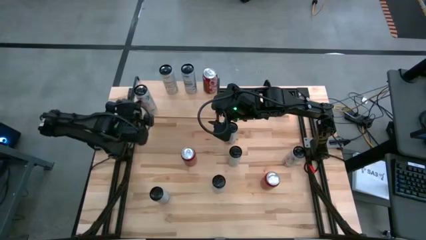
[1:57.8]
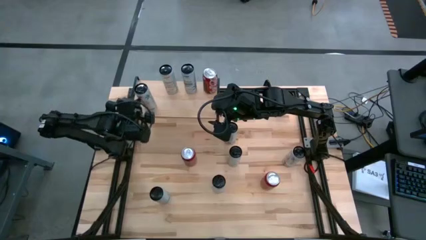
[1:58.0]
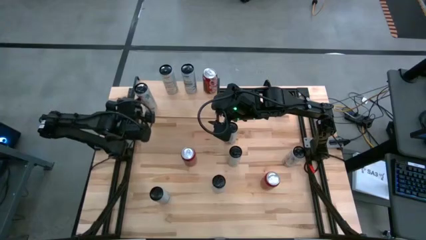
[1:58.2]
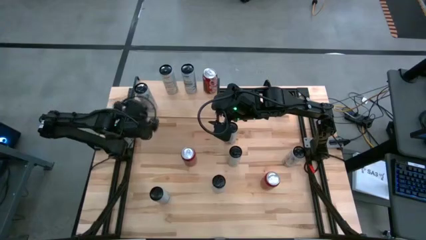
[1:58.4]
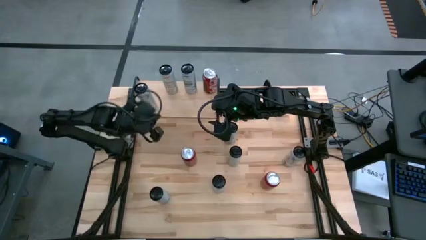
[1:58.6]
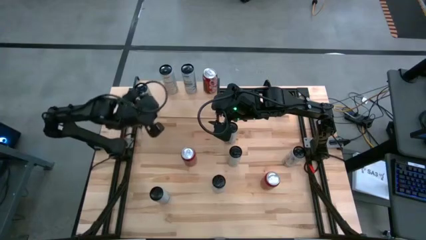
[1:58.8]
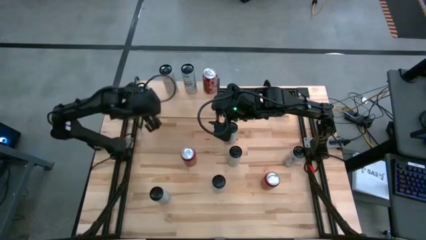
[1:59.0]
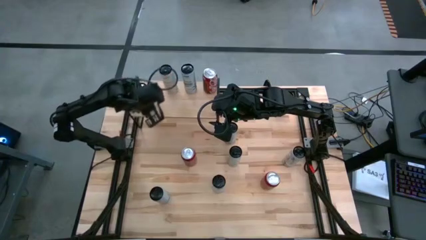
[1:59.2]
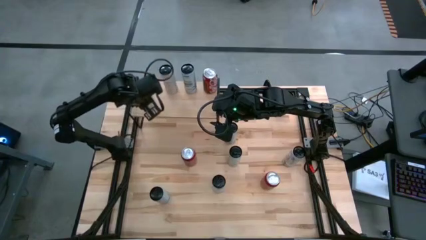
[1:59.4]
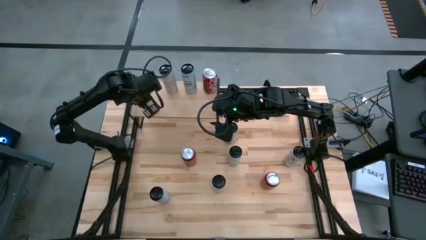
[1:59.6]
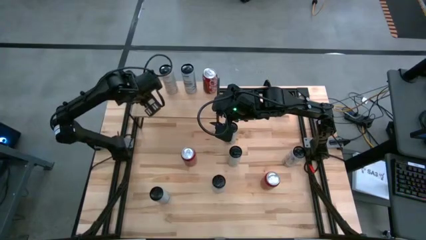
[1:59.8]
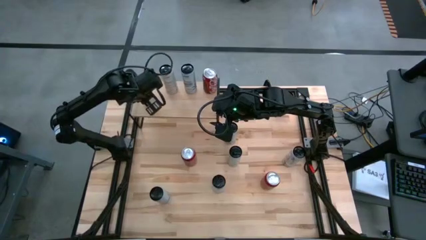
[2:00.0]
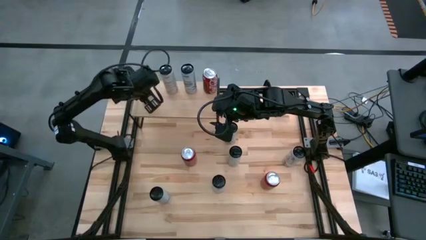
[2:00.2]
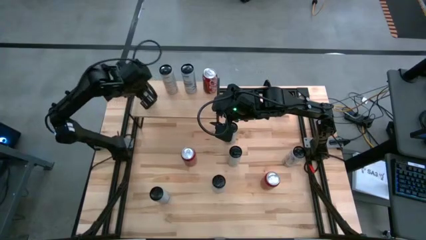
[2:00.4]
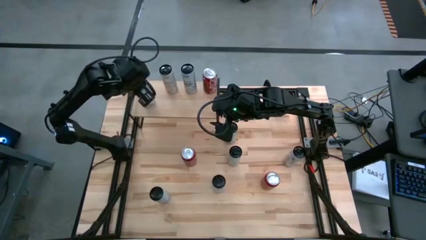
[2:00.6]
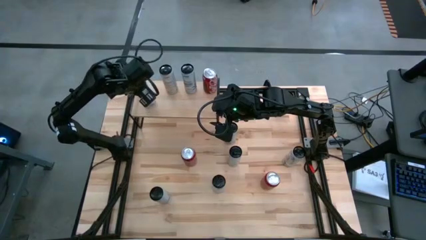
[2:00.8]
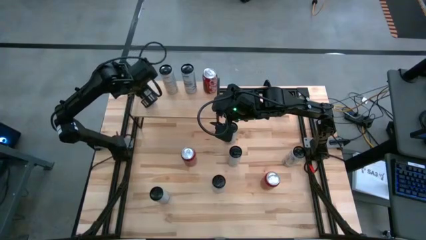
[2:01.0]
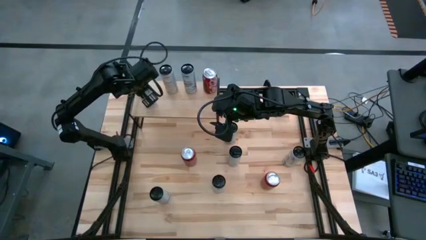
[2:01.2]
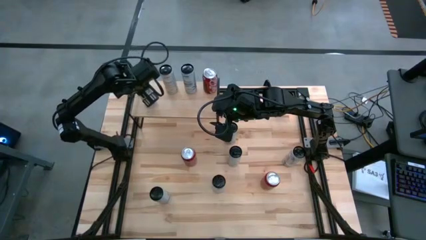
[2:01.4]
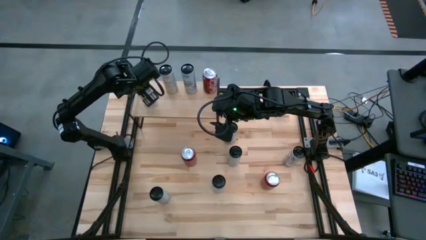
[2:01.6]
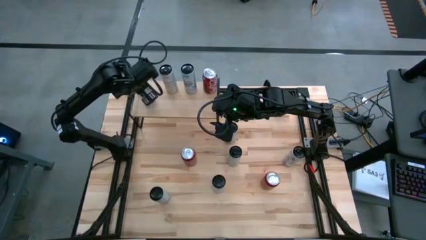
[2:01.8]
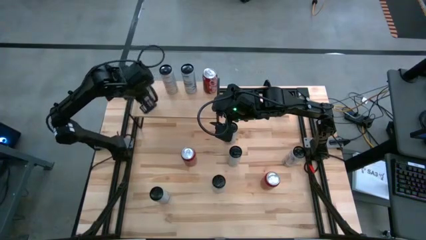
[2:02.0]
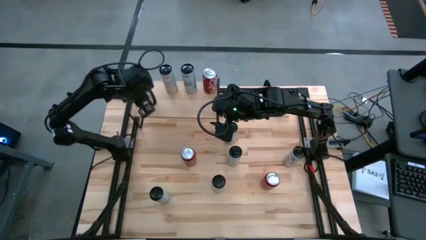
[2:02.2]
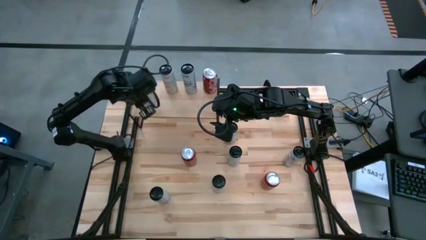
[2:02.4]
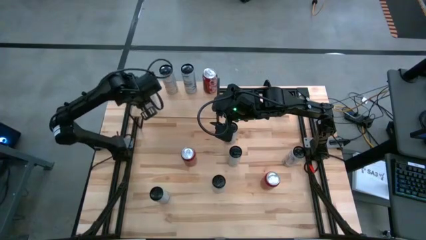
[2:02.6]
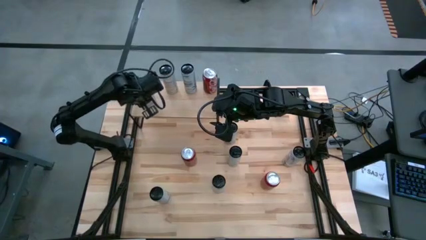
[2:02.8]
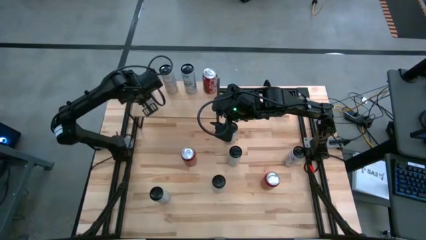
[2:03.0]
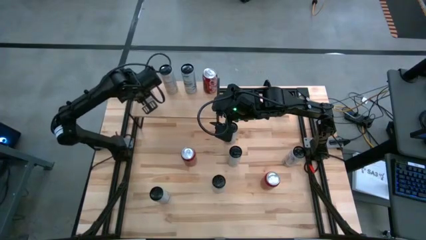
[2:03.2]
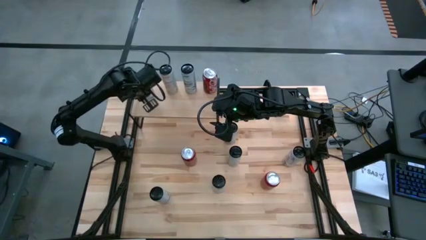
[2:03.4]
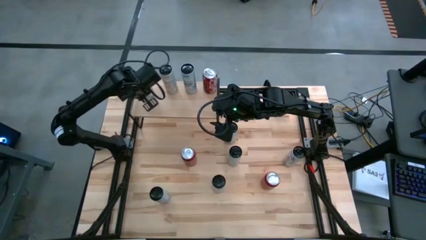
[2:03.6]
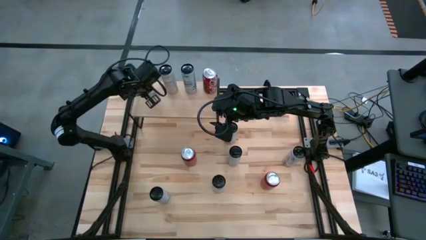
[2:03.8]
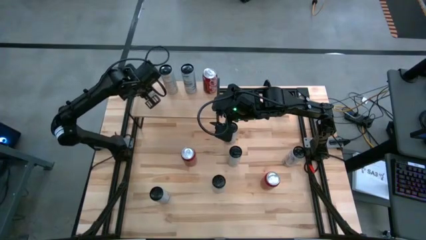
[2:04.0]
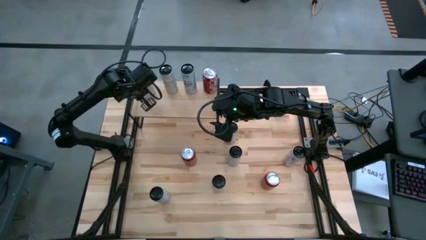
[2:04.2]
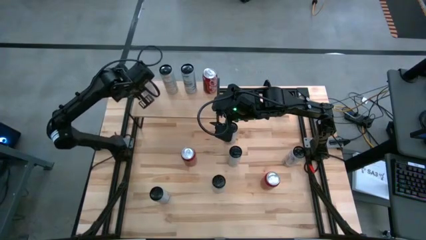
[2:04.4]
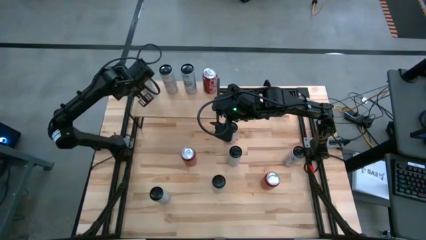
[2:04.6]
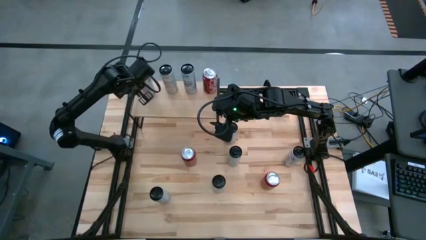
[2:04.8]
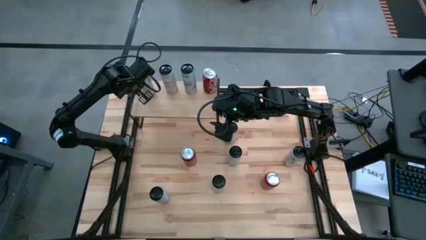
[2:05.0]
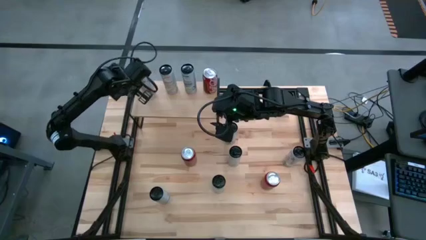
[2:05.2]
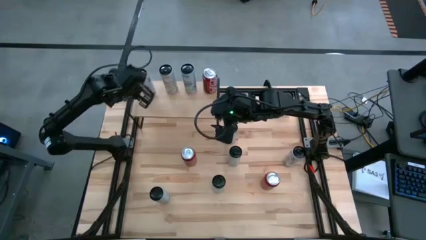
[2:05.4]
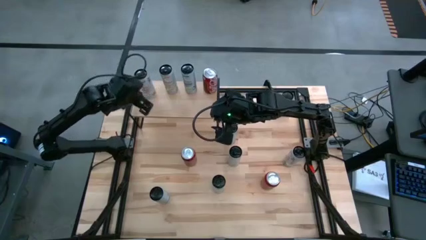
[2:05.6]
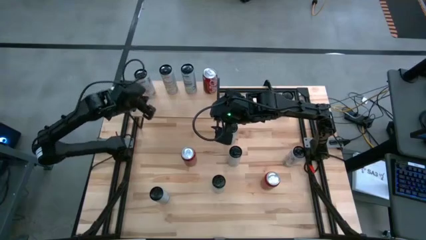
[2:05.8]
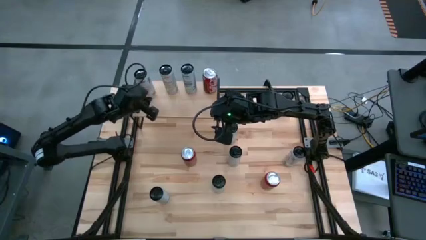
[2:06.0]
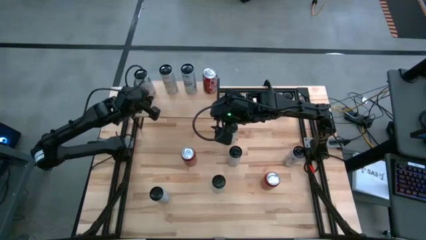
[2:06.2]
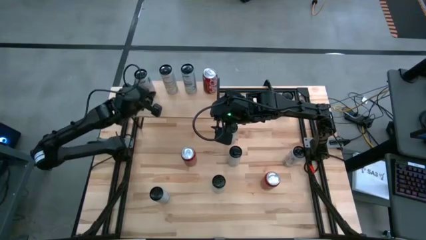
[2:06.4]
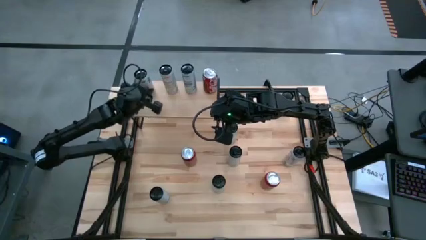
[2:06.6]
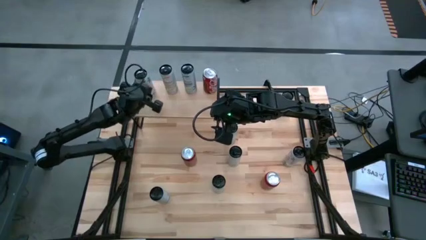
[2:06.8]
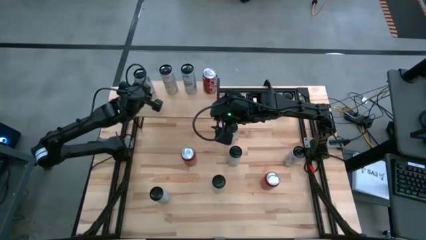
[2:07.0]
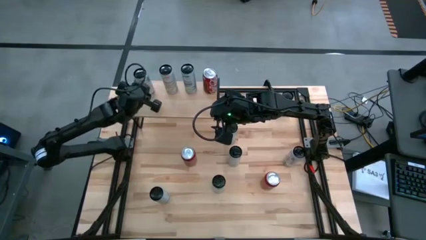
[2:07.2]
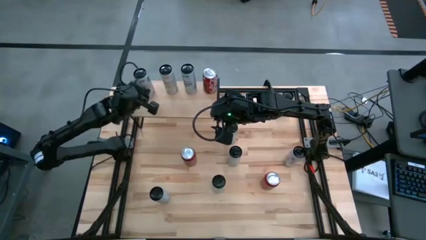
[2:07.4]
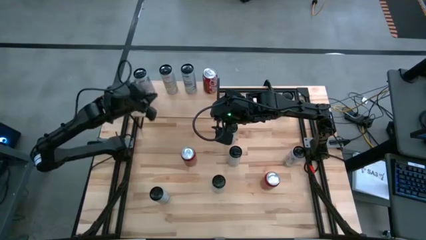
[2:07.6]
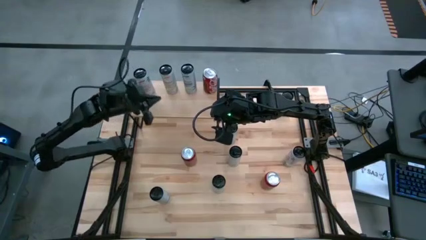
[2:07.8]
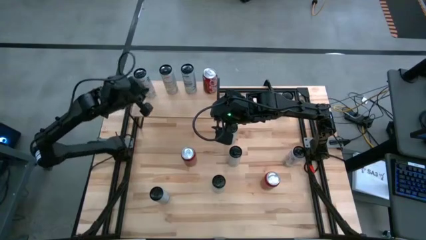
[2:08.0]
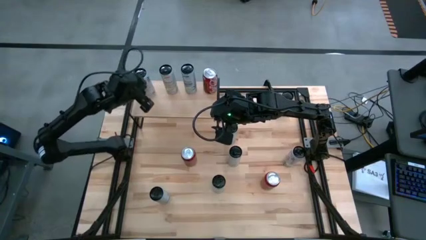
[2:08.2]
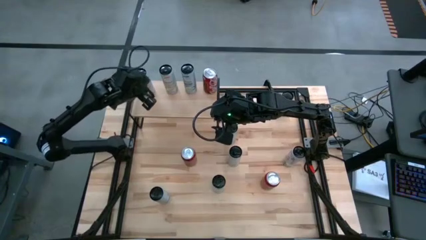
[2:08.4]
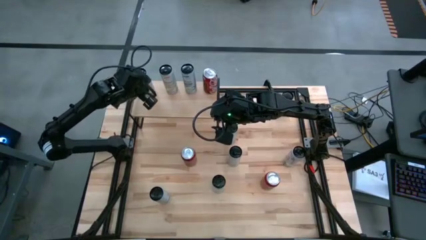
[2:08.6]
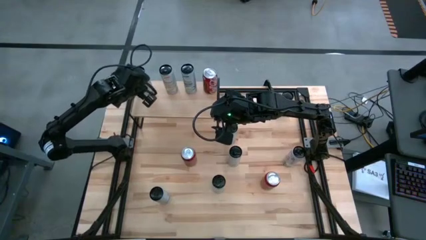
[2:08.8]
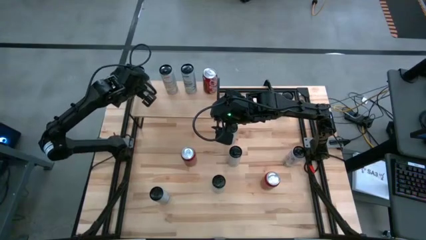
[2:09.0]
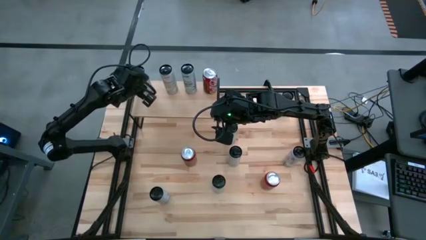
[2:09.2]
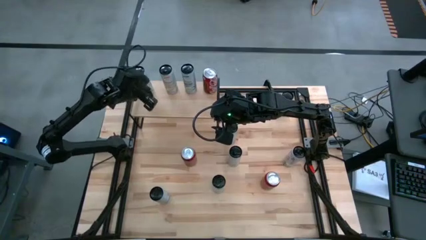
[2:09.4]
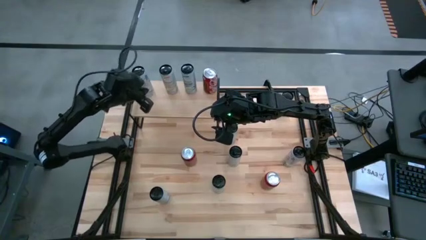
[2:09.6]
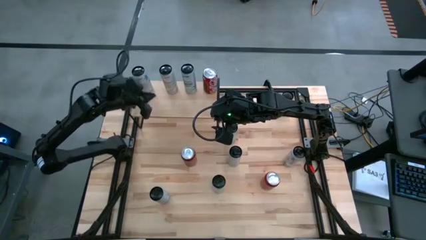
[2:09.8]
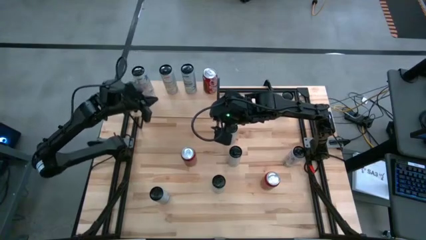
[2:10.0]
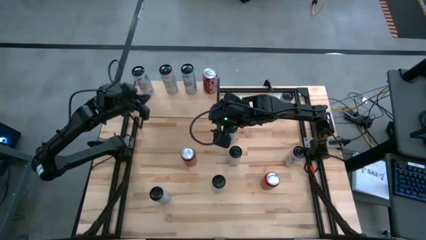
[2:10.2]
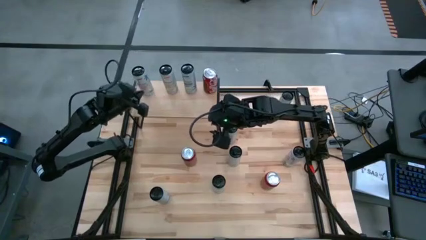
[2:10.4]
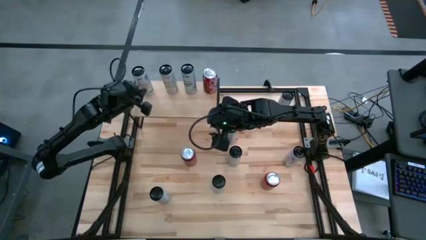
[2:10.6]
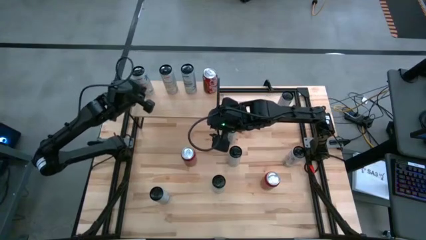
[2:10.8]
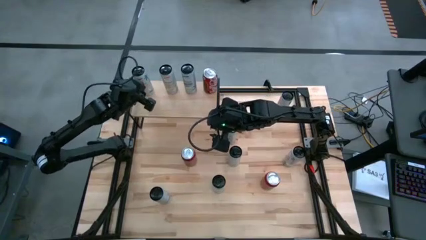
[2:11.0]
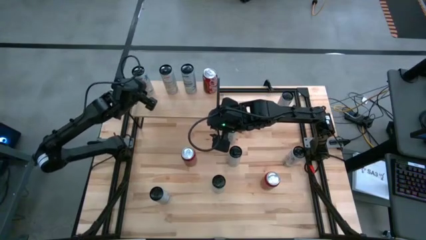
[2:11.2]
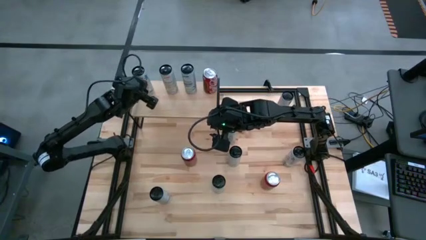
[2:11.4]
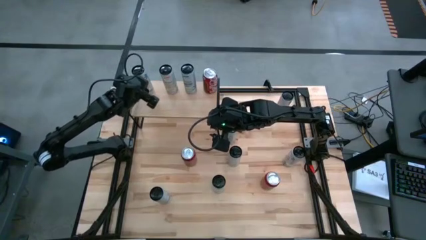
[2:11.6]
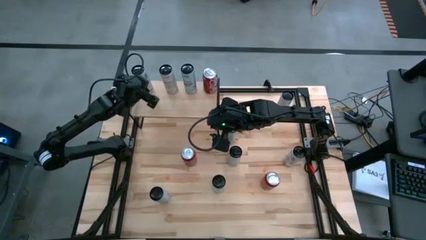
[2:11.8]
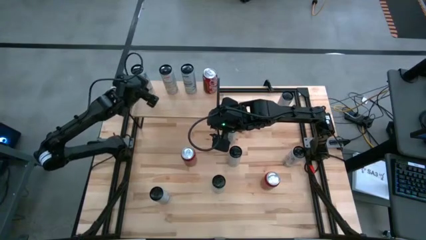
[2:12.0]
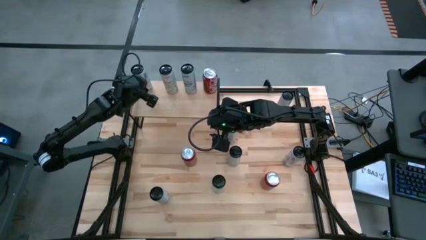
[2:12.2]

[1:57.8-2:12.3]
Task: Place canned beverage on shelf
Put the bottom left white pink soda can on the shelf
